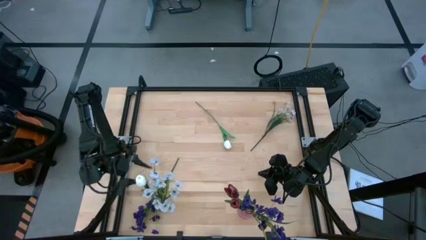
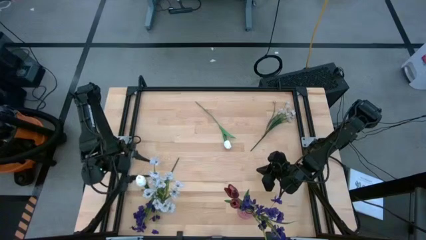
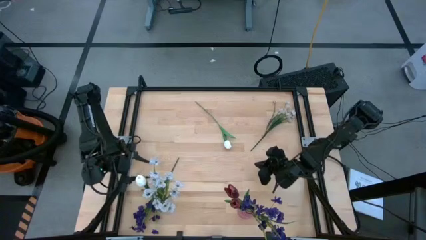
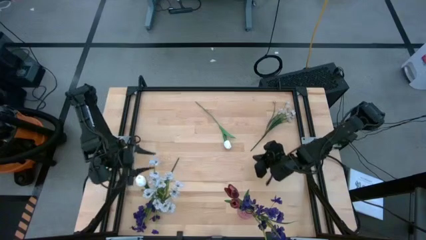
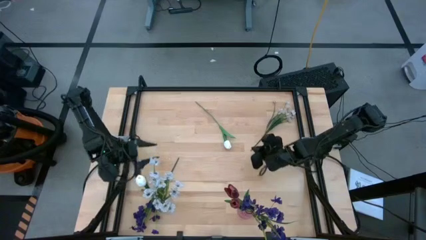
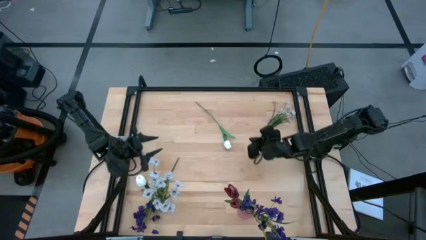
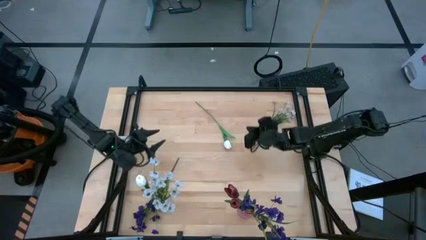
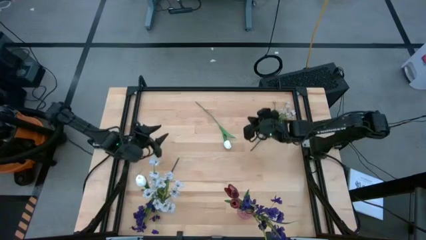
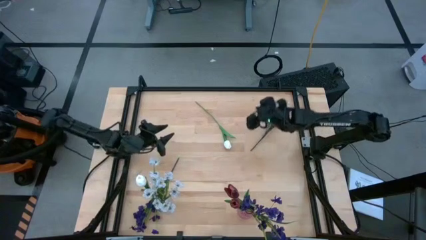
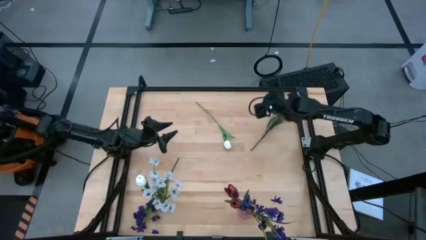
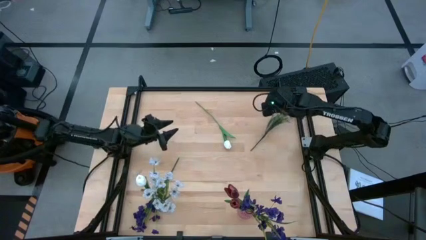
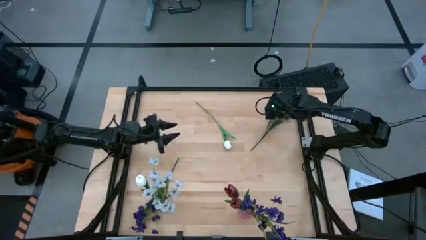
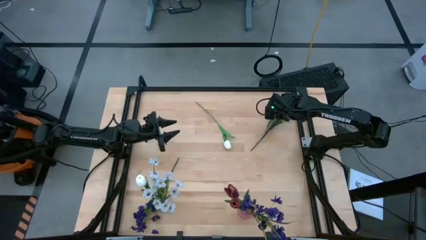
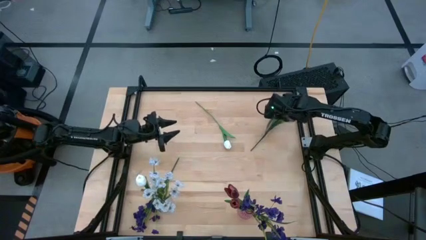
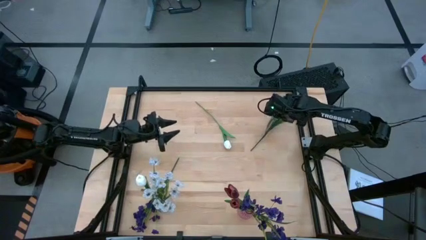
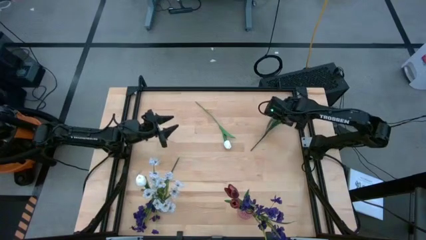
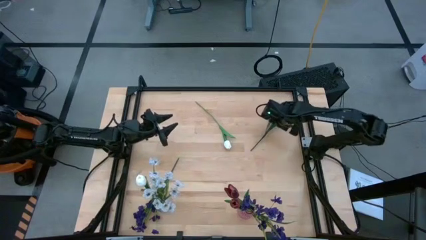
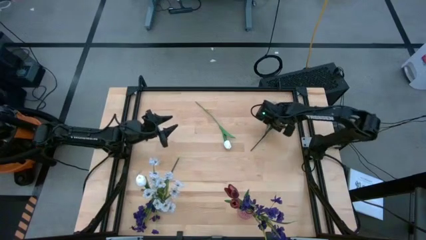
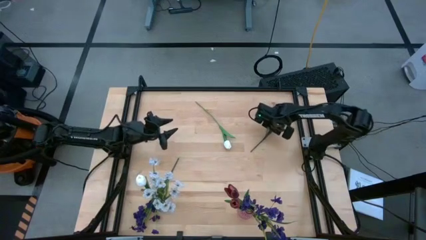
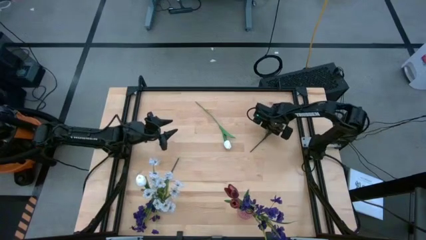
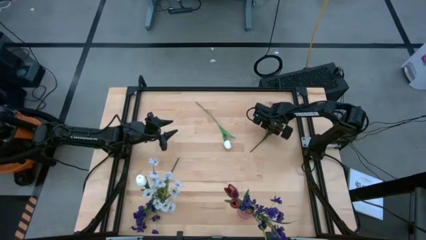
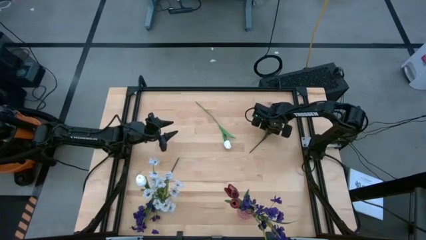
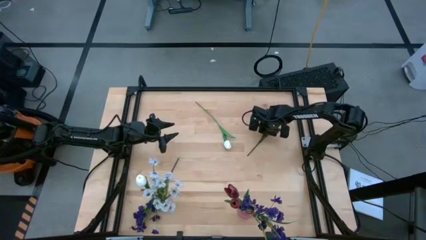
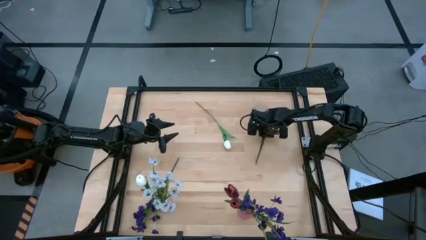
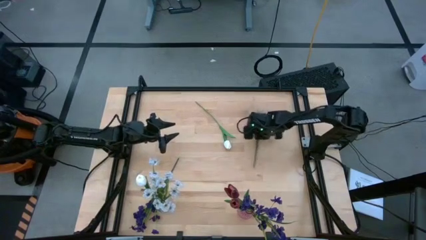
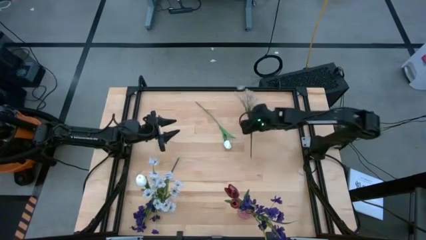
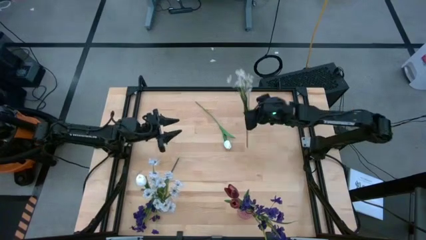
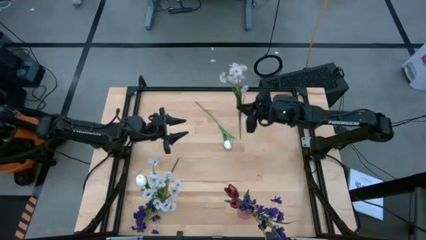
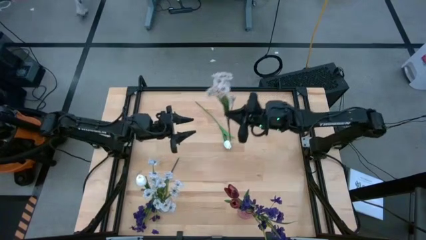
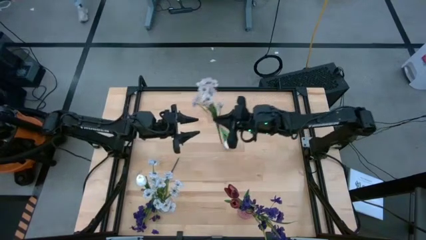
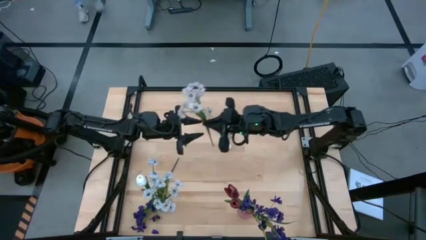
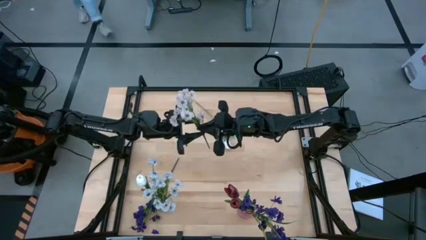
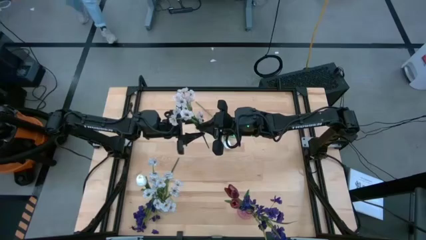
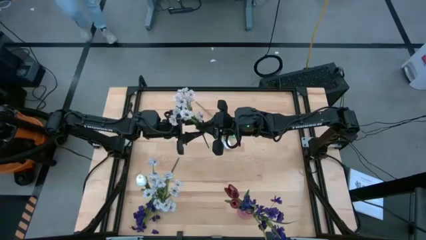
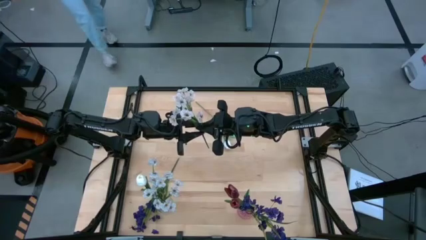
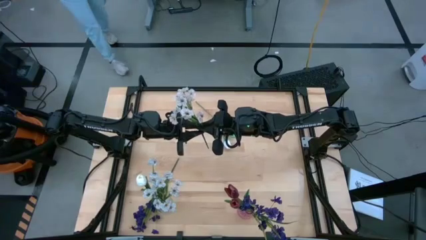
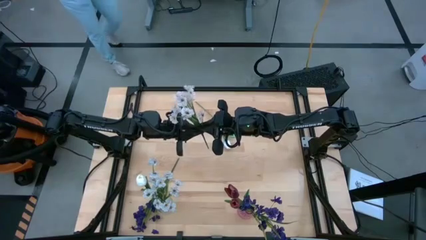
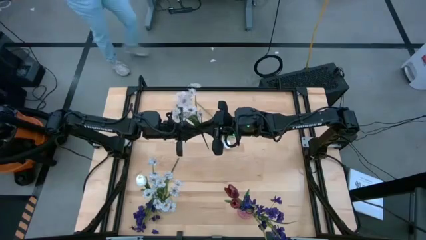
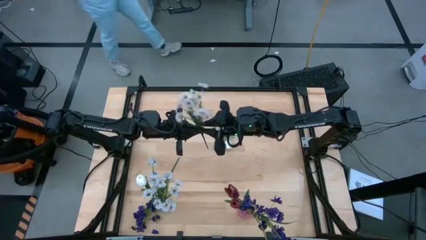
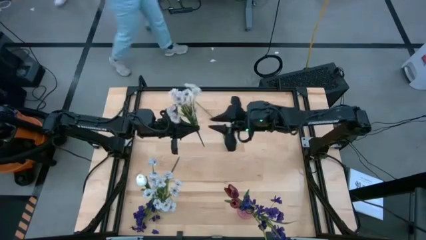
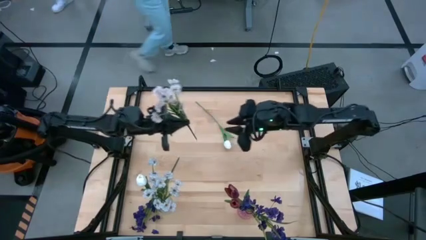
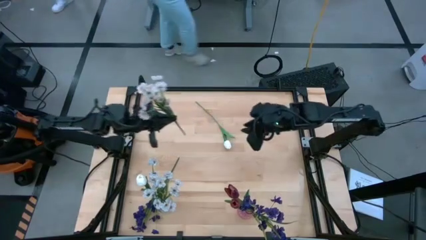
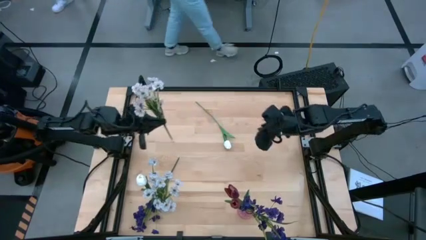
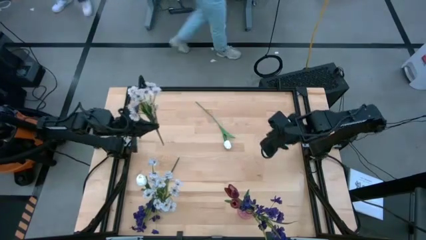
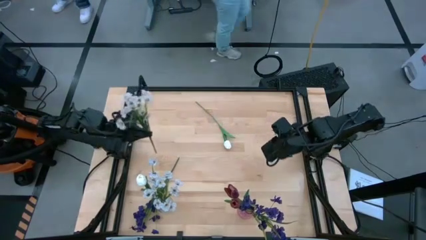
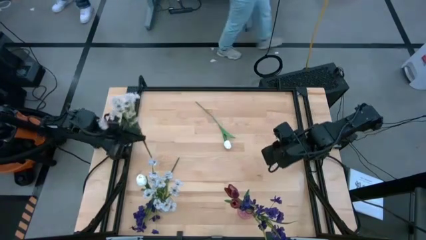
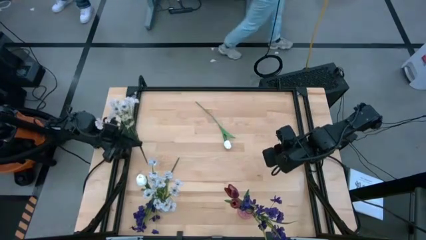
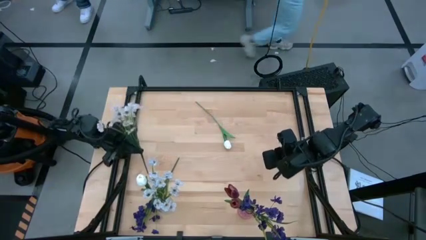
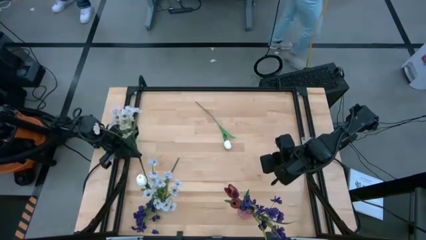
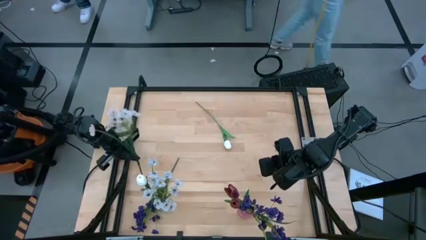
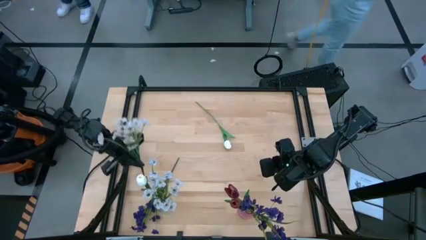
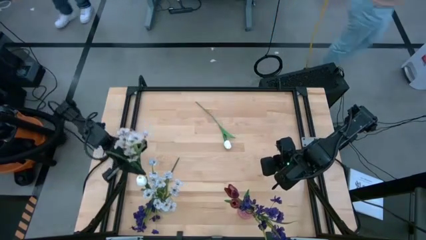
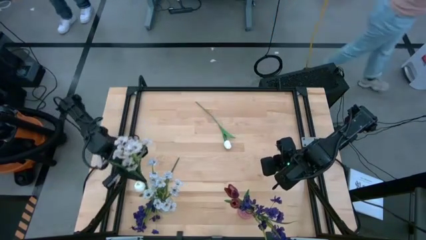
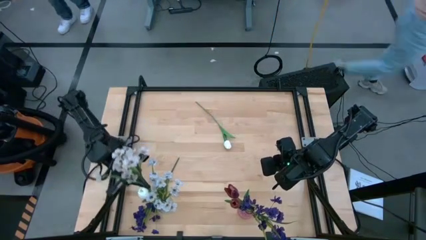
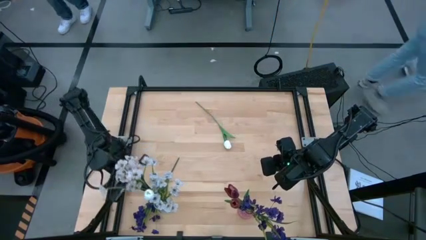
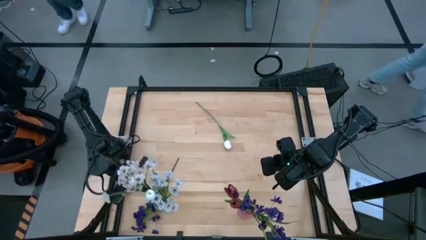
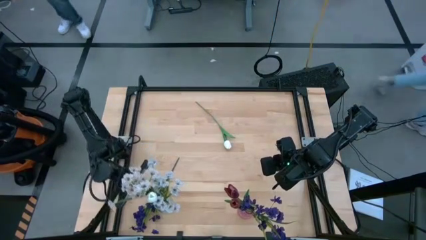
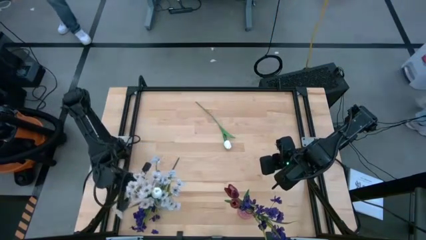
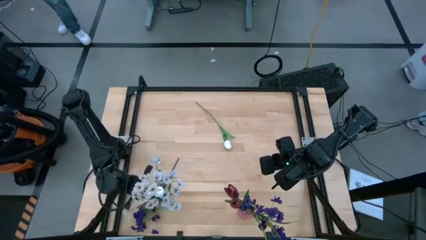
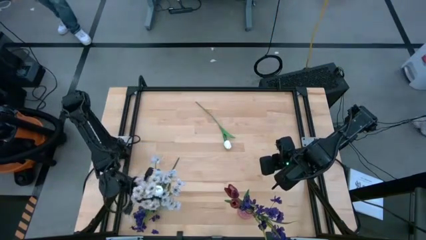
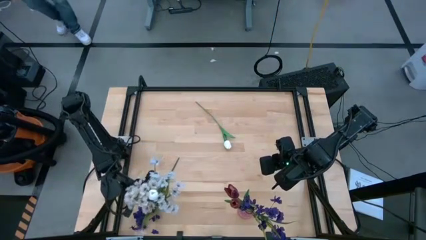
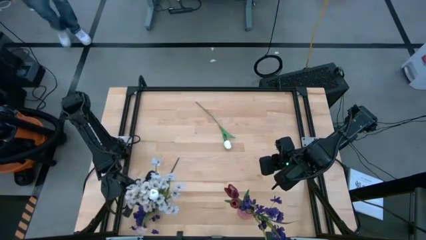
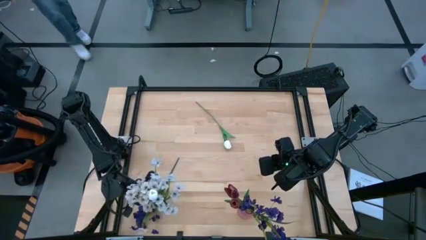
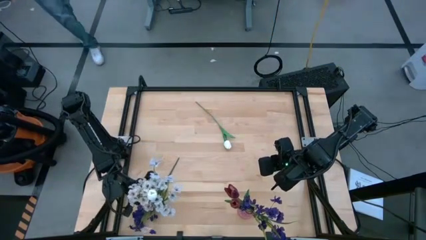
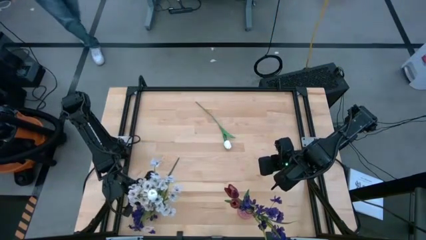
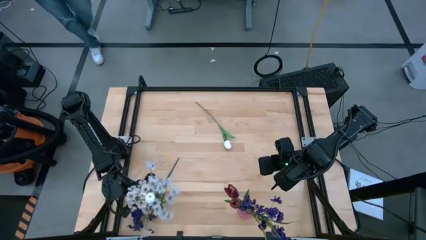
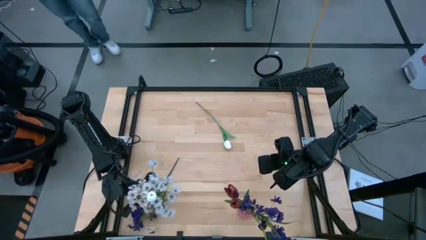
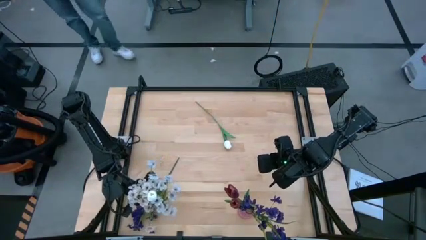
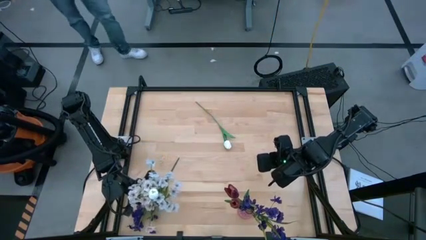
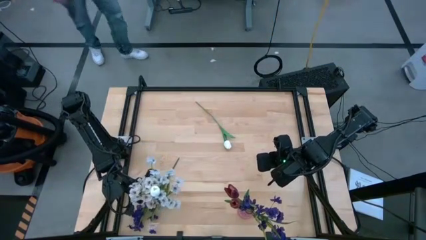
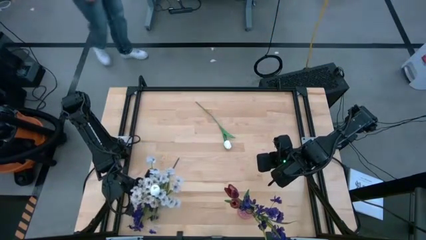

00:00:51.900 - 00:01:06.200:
Task: Sort flowers into vase by color
Put the white flower into the transparent vase

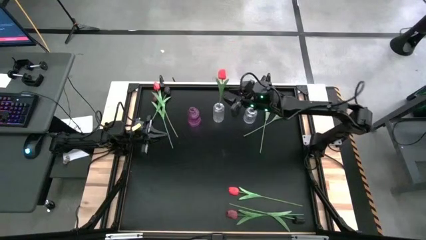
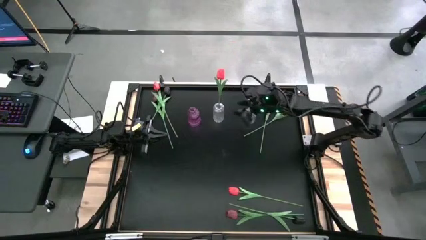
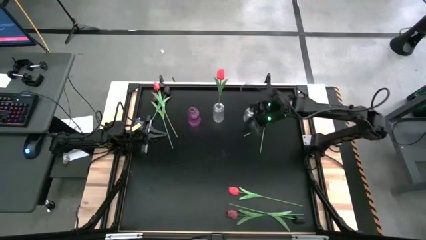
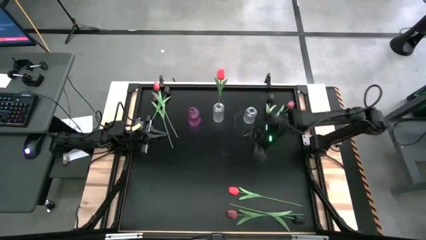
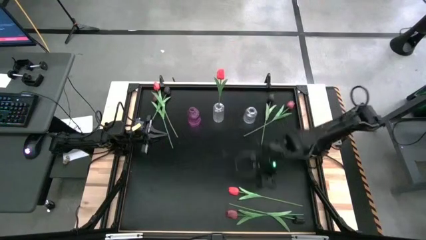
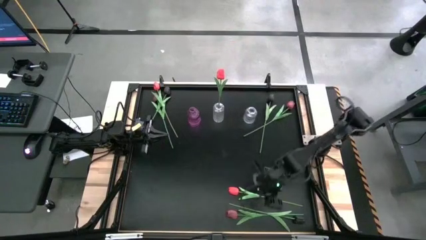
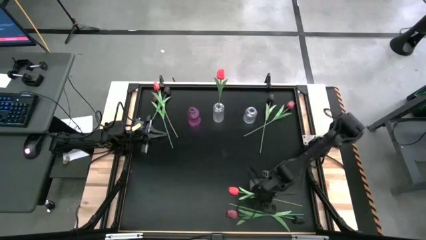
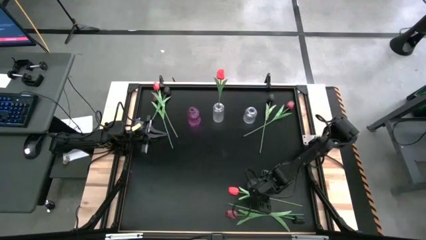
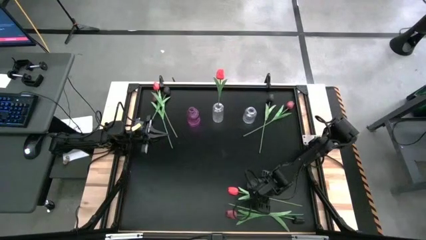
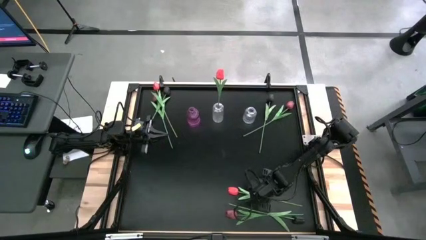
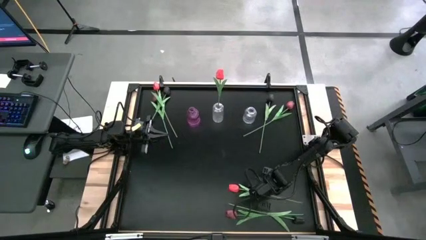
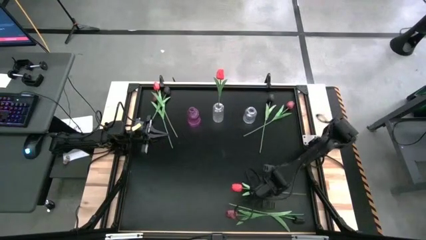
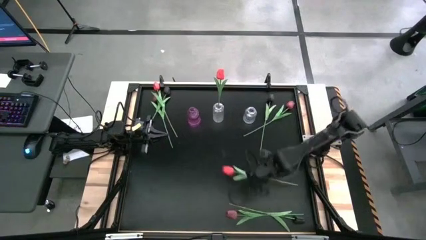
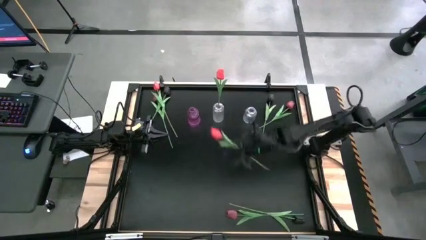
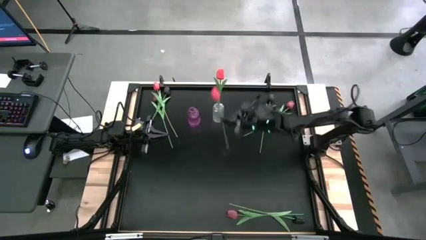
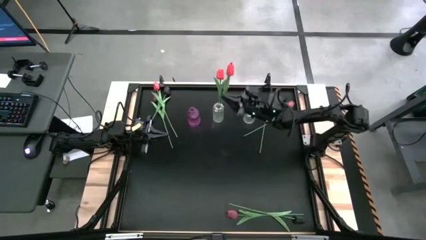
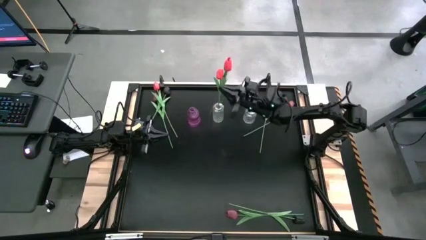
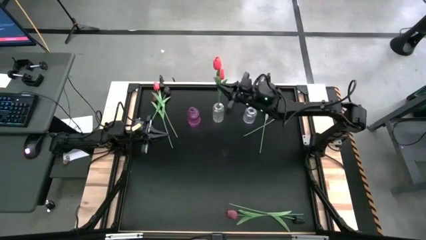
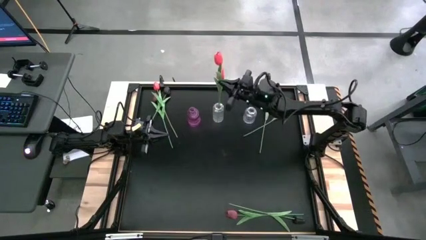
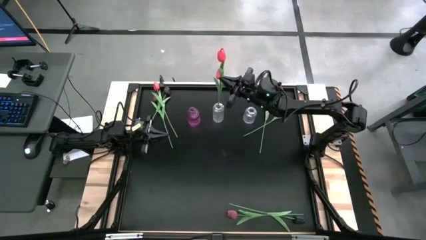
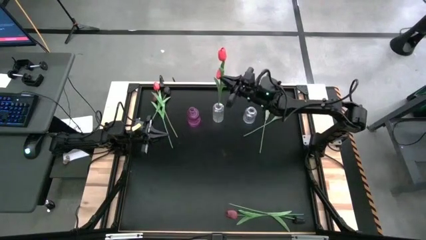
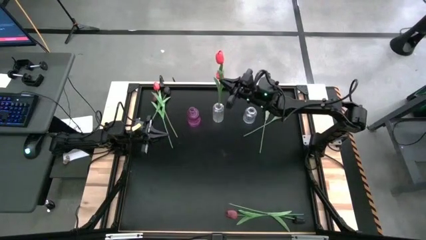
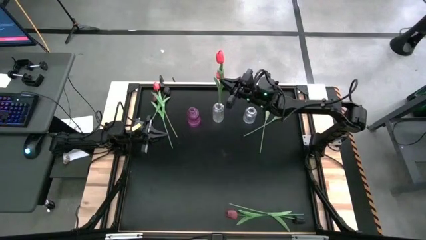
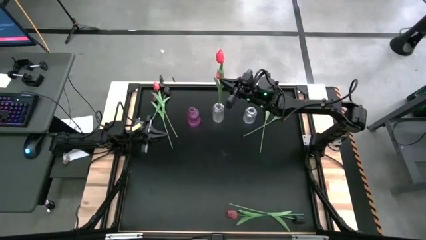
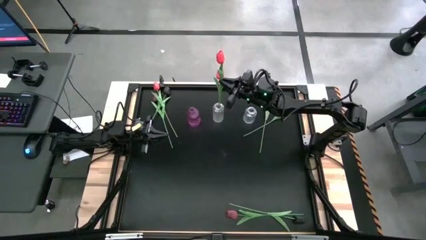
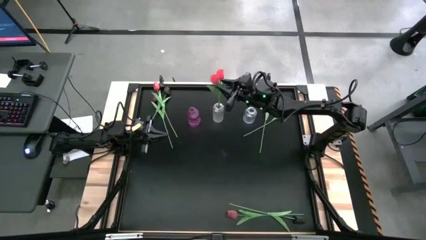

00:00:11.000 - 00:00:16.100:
Task: Sort flowers into vase by color
Put the bottom red tulip into the left transparent flower vase
